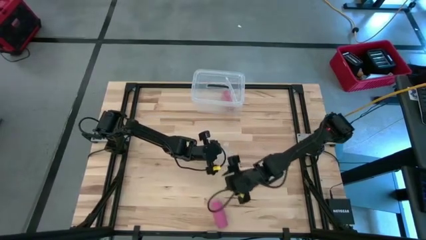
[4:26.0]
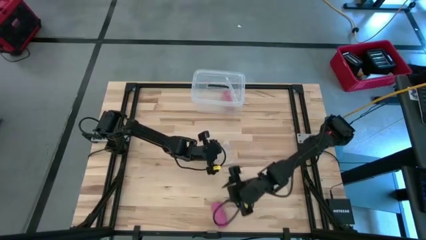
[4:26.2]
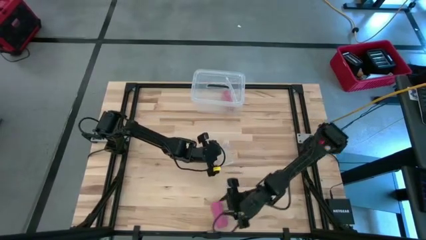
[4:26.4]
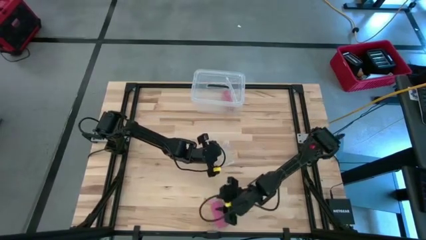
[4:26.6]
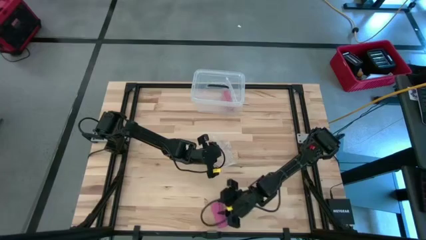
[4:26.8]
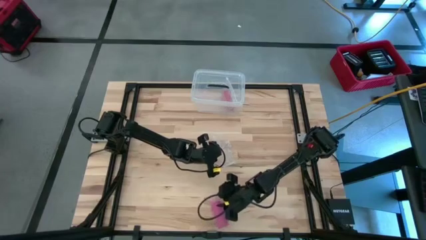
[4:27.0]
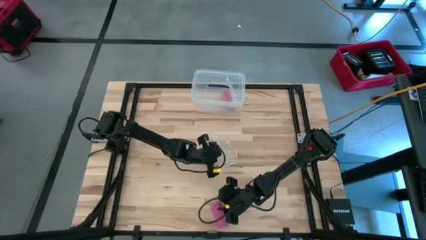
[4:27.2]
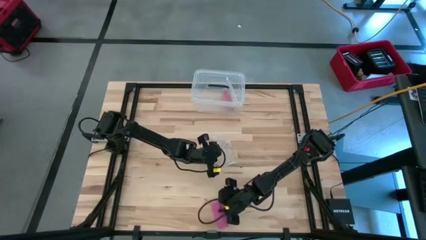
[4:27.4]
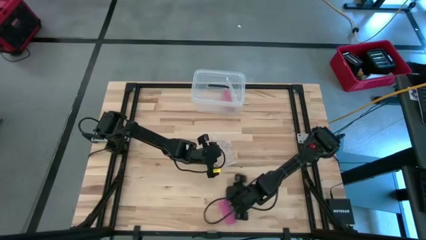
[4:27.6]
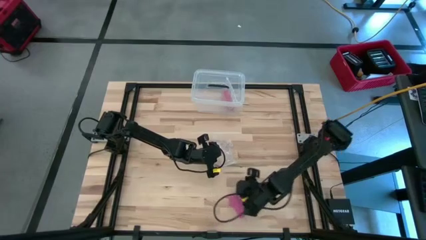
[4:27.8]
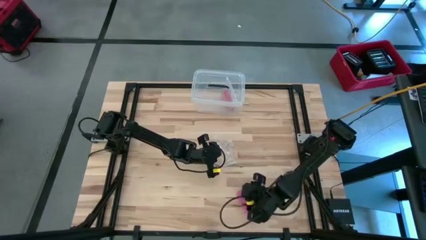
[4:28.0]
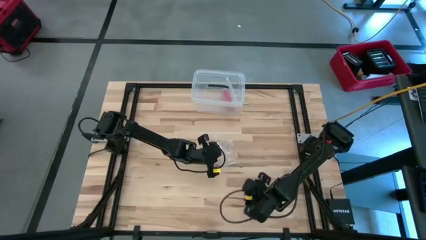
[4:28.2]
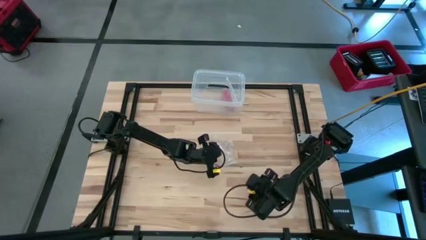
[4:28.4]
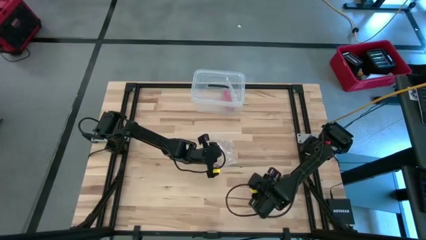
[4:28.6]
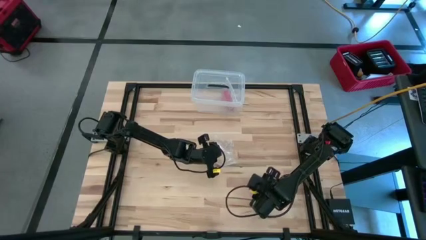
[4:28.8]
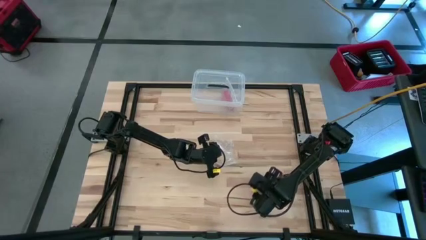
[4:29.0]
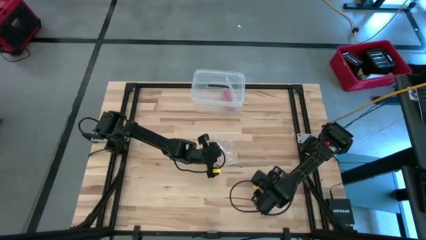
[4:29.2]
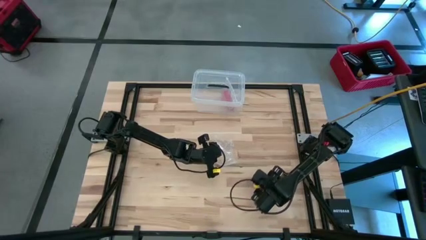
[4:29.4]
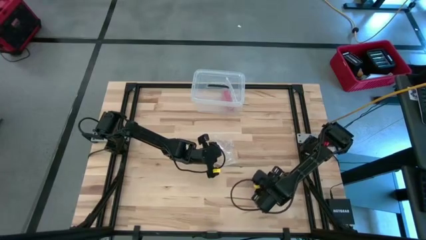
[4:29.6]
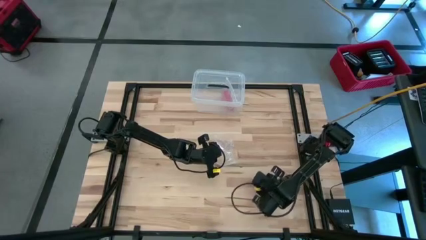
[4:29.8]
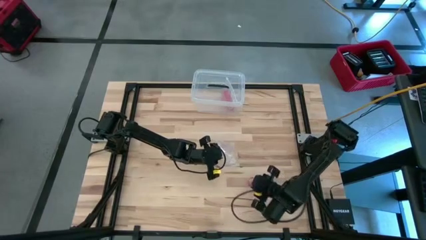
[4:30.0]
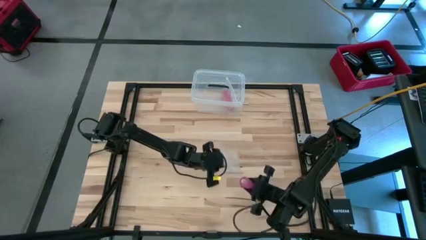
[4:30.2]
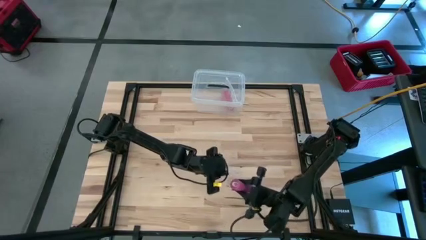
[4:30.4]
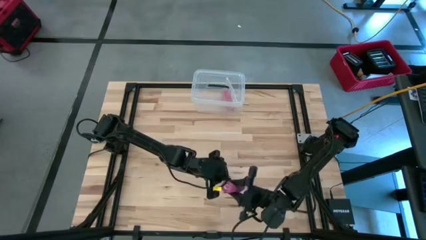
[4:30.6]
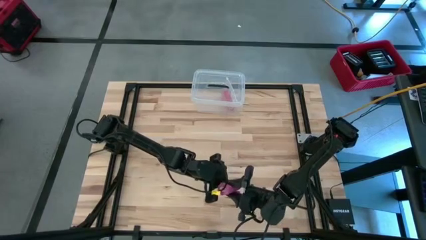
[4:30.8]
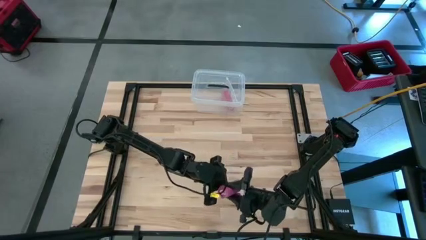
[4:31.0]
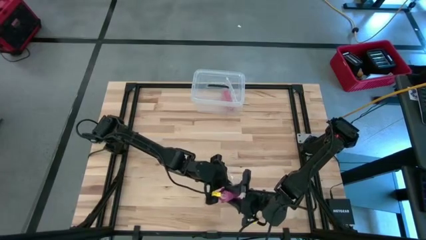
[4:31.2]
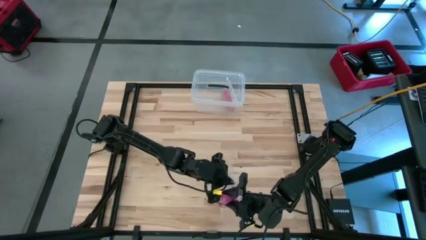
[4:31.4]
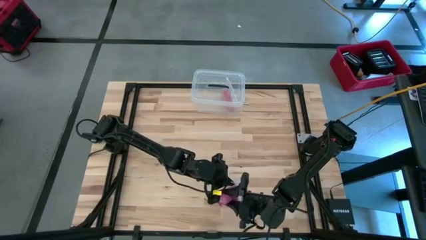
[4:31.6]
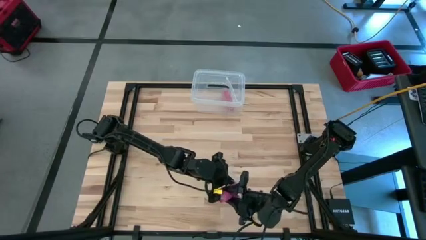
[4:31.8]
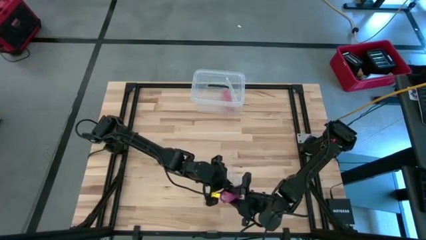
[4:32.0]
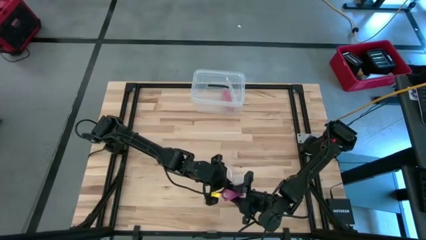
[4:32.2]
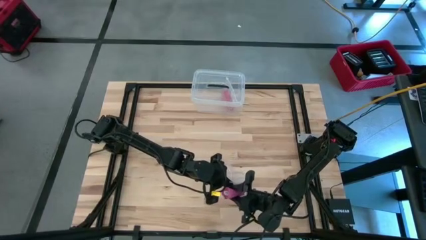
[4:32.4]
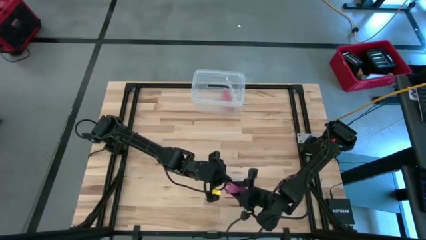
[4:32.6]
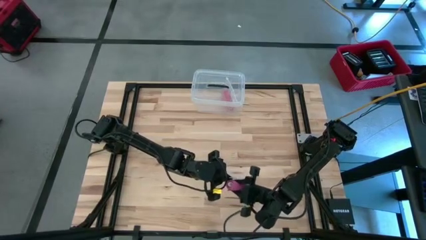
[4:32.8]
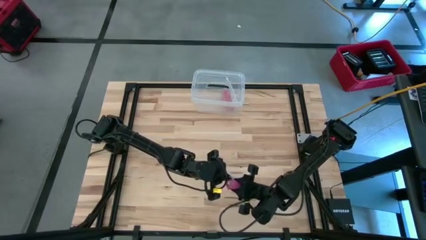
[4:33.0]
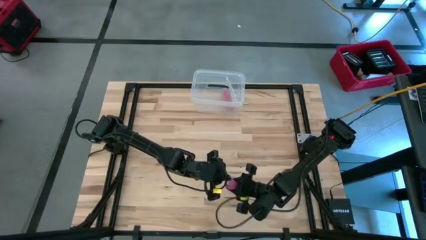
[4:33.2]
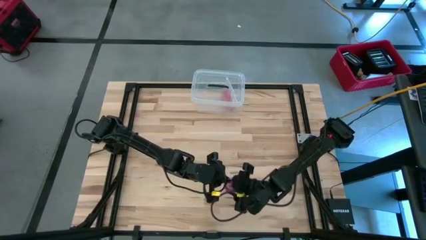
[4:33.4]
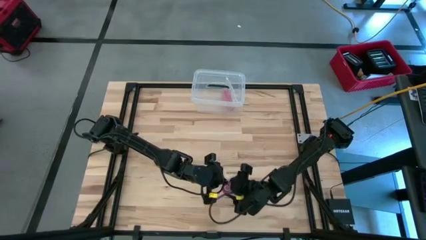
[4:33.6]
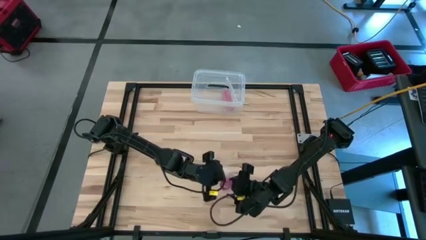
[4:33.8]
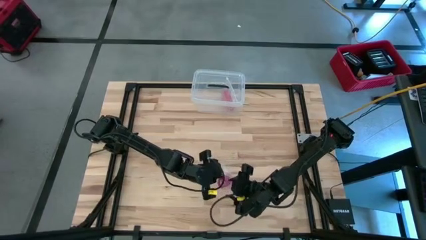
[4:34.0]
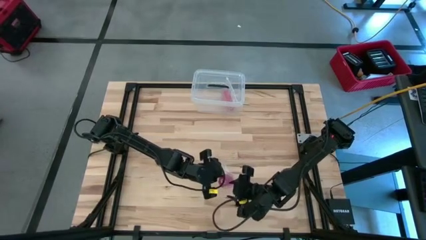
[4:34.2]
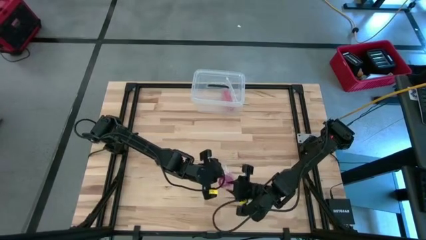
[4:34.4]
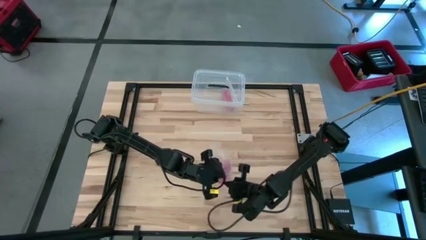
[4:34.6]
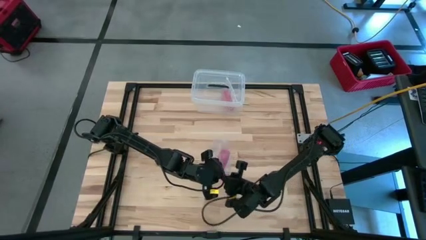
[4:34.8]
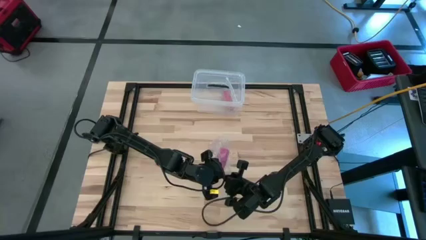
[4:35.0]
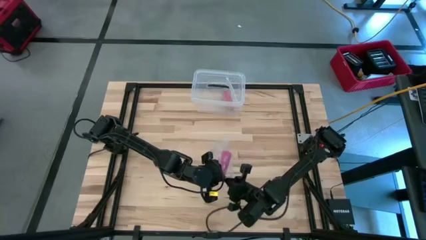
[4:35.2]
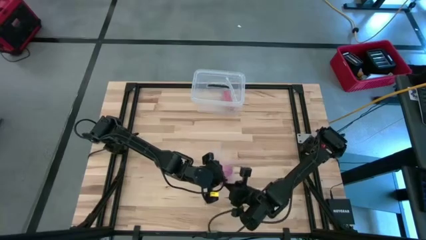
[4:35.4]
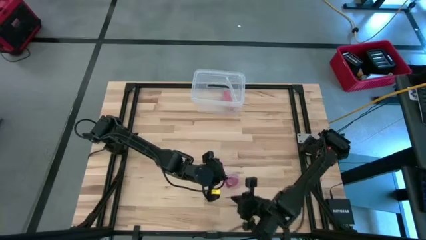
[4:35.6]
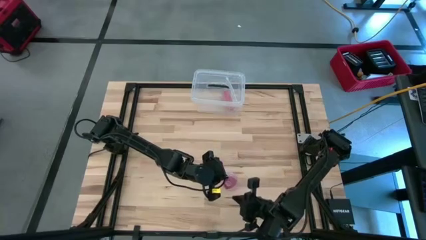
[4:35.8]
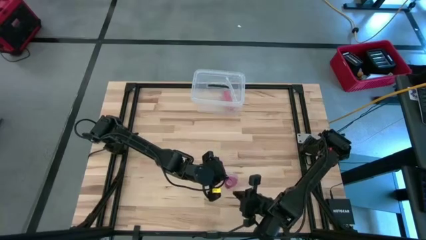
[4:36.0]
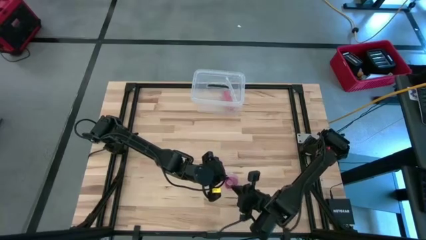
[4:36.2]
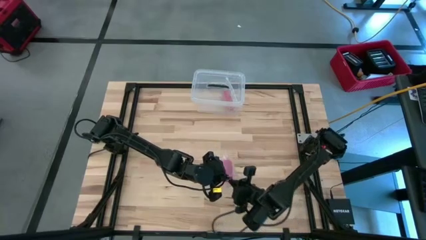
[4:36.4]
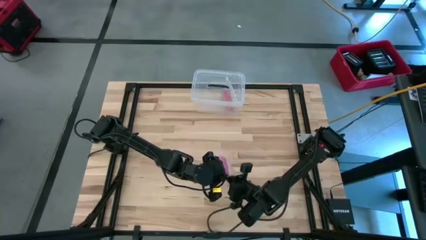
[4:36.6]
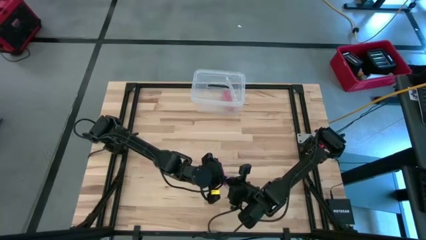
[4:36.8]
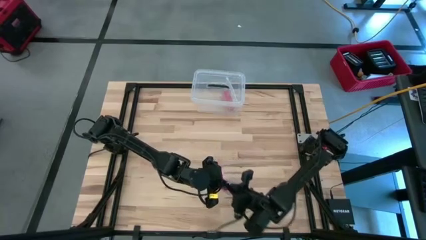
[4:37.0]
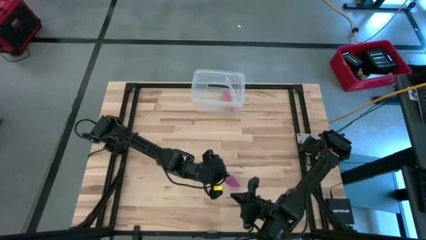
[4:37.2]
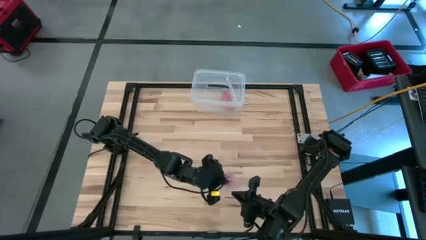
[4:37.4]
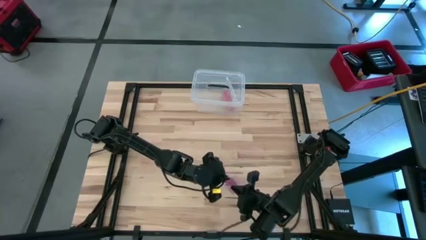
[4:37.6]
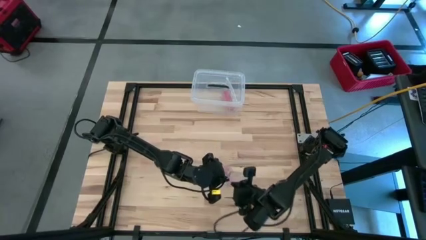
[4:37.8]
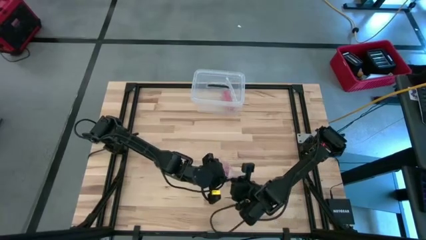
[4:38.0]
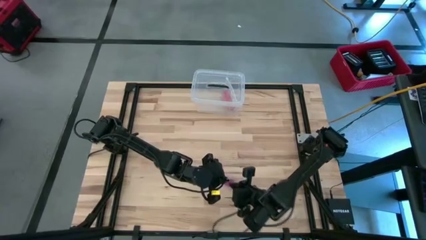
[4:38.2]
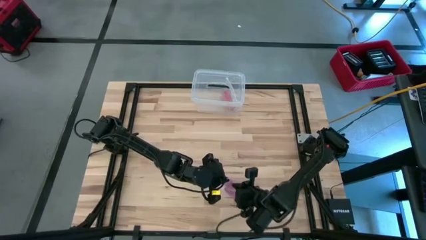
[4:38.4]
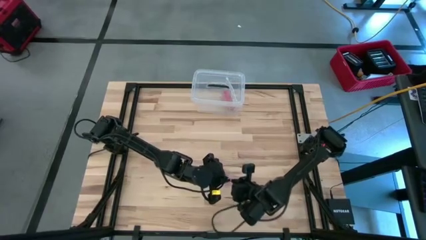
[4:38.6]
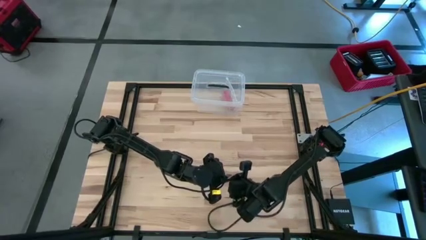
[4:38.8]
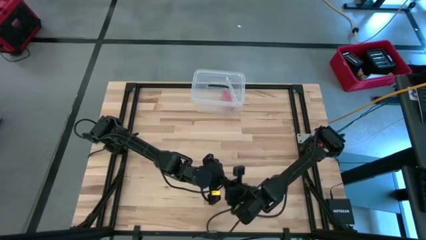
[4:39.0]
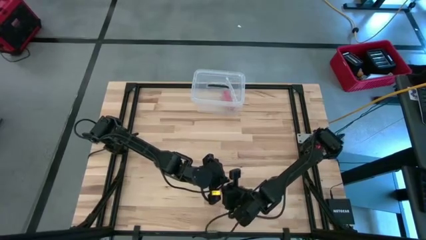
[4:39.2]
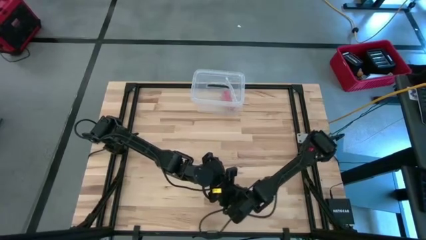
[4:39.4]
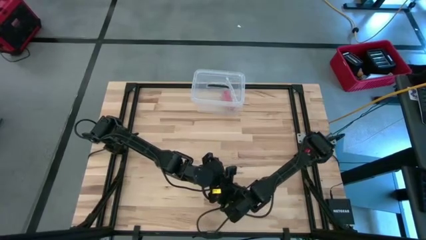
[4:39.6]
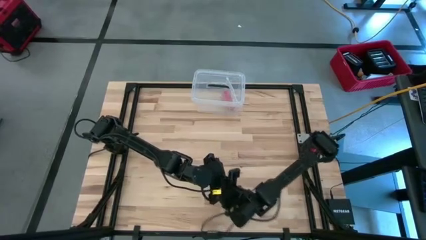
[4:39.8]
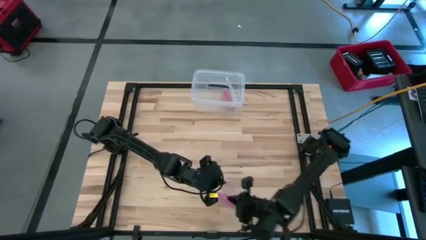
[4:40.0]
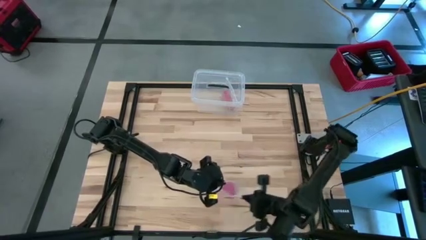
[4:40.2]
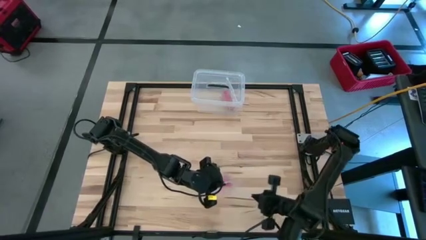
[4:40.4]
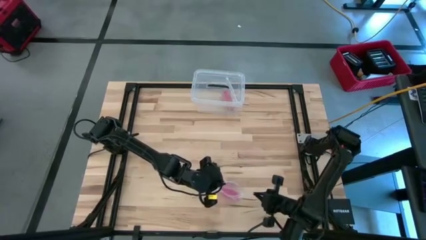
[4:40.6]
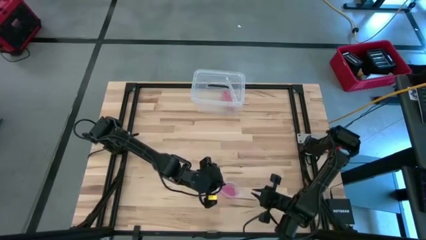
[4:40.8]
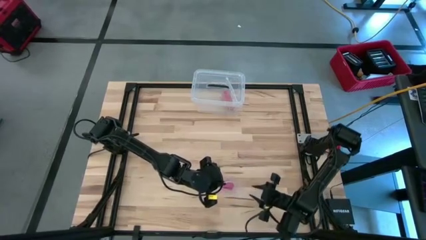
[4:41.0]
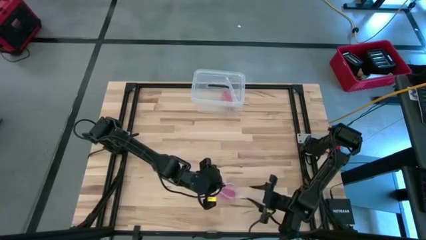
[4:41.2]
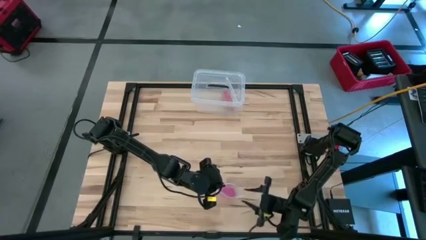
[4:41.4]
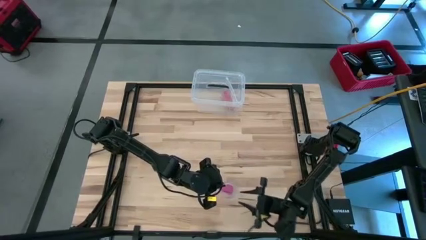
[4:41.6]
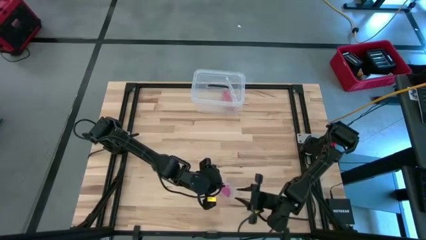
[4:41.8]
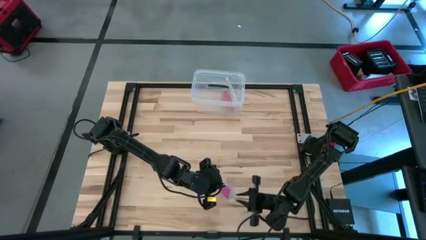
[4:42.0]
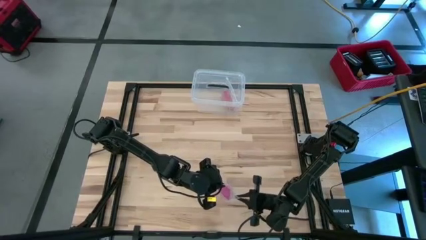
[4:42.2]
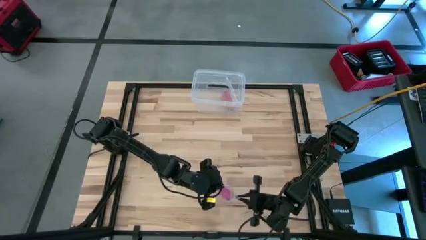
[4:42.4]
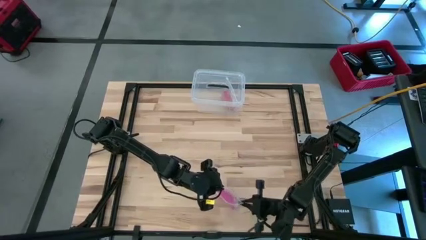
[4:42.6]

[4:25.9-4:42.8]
Task: Roll bandage
Put the rolled pink bandage into the transparent zip bag
